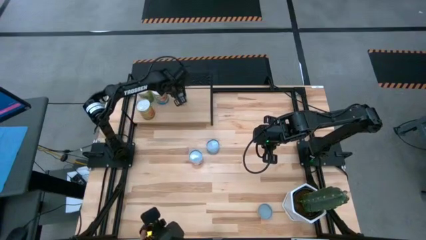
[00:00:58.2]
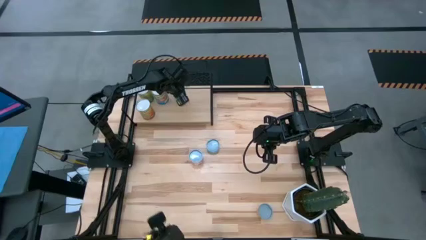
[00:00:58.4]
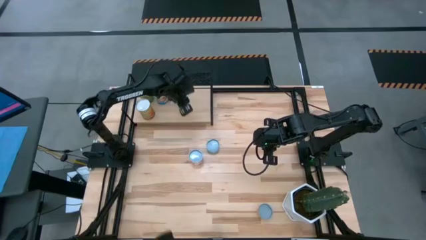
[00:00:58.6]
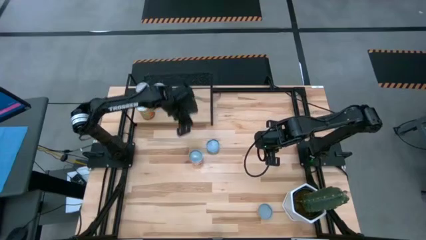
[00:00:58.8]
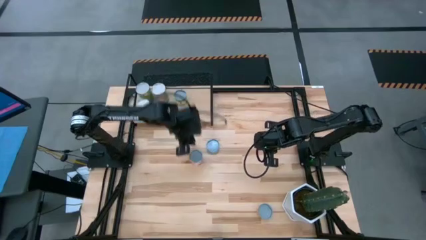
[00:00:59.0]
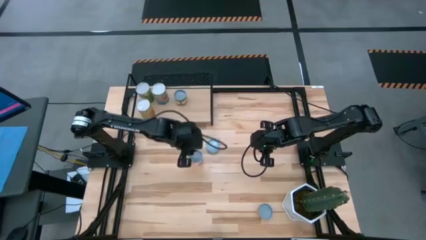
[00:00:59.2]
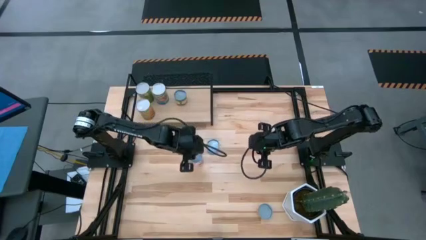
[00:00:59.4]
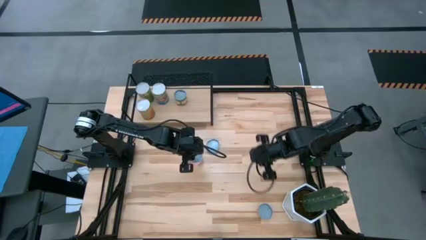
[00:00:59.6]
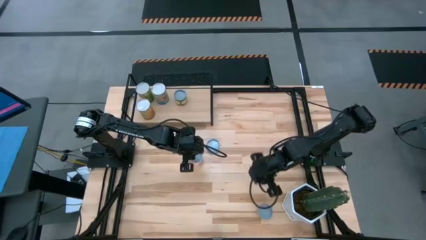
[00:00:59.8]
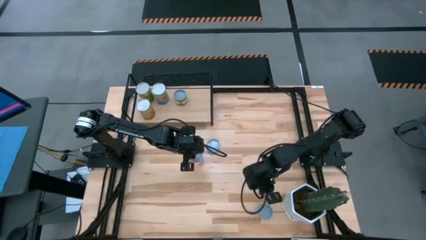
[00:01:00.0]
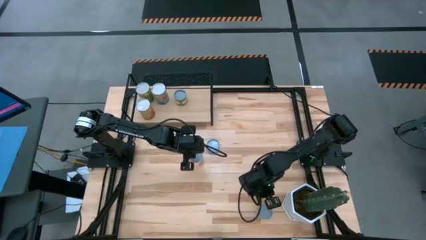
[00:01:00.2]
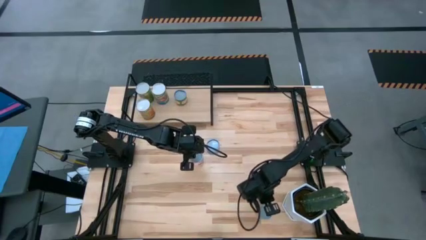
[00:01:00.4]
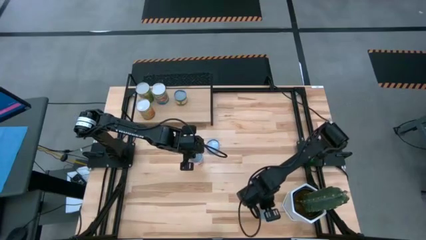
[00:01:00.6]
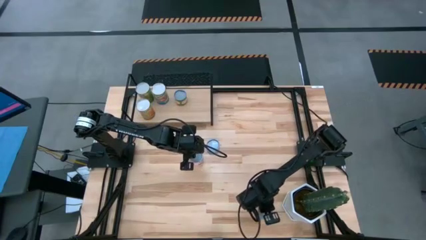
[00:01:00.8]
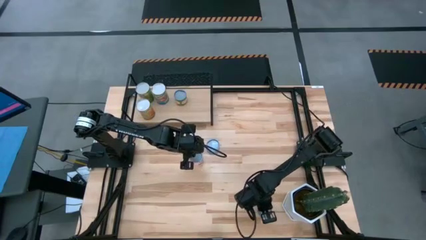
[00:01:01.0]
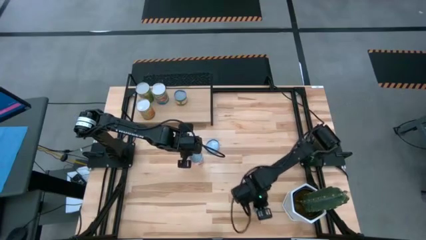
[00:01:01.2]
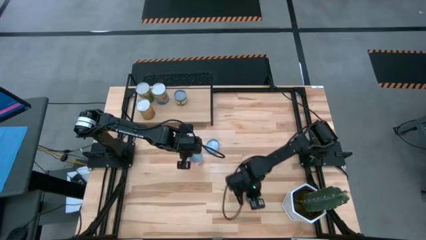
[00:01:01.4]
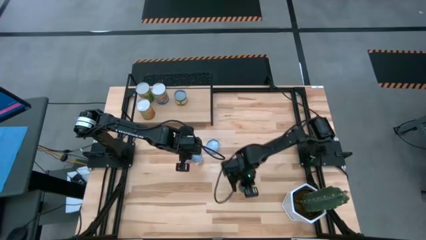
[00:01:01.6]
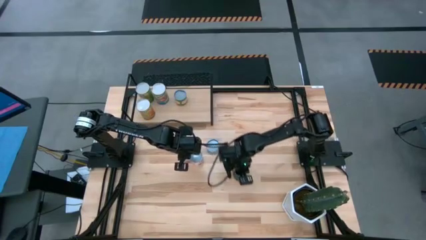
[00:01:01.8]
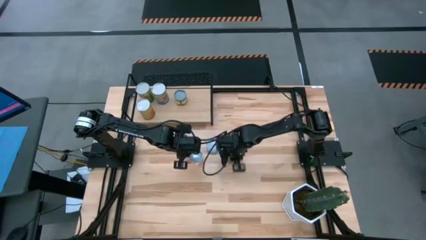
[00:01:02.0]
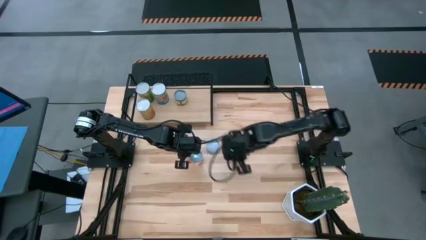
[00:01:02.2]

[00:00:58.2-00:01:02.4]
Task: Pick and place cans onto a shelf
Move the canned pineapple to the center of the table

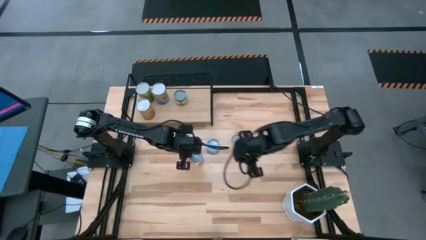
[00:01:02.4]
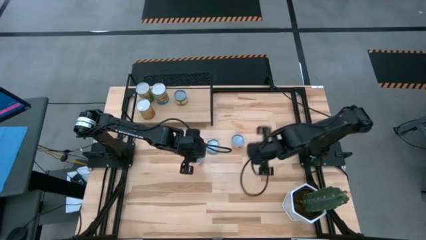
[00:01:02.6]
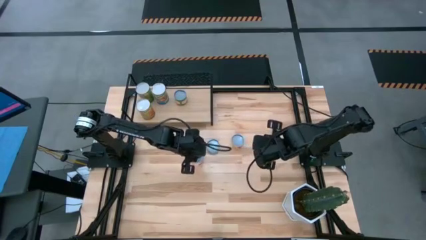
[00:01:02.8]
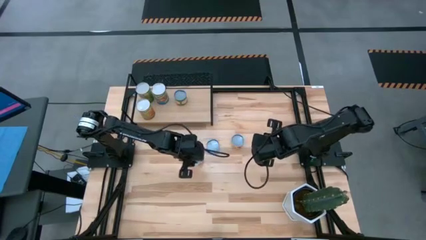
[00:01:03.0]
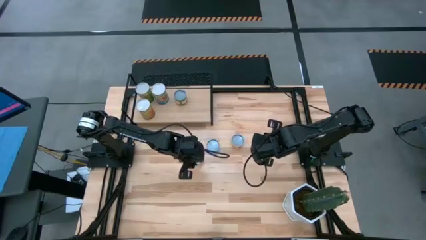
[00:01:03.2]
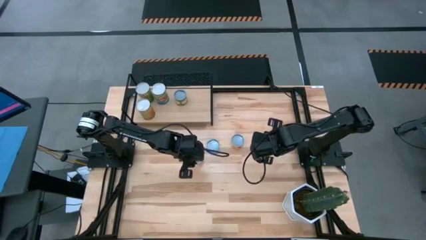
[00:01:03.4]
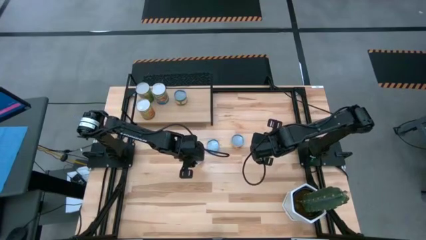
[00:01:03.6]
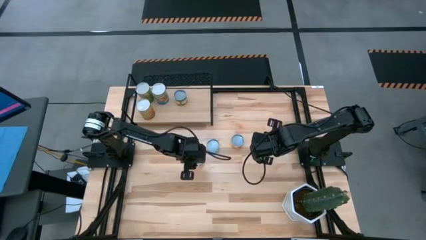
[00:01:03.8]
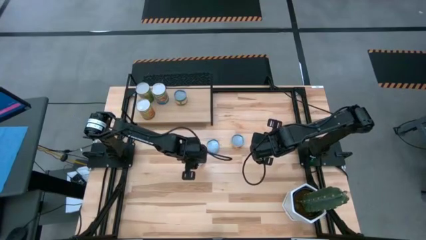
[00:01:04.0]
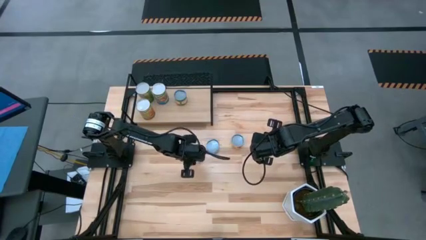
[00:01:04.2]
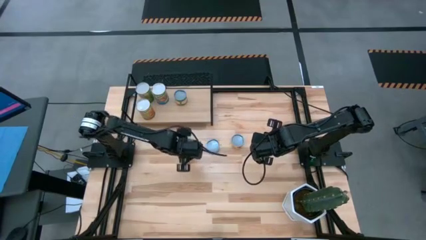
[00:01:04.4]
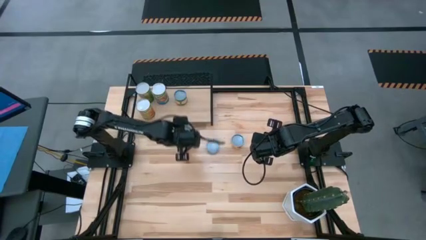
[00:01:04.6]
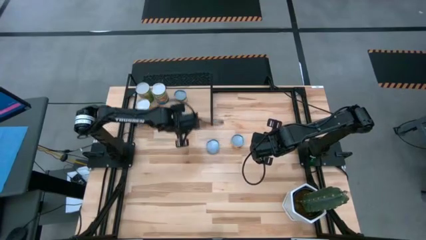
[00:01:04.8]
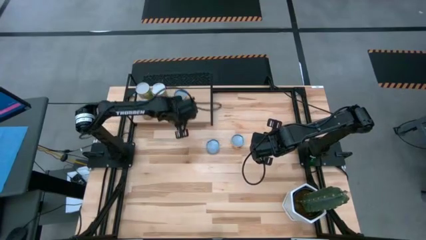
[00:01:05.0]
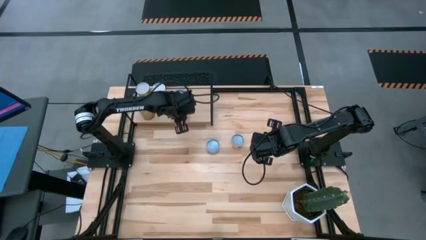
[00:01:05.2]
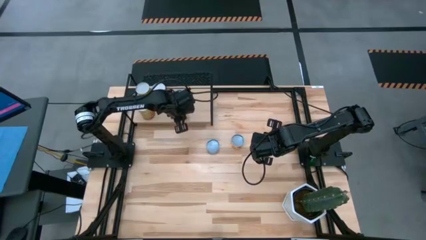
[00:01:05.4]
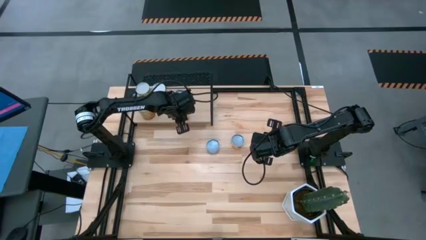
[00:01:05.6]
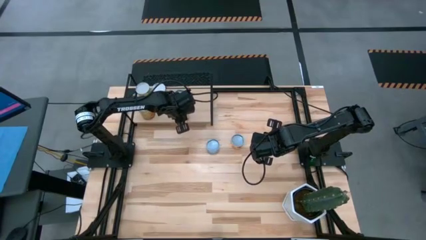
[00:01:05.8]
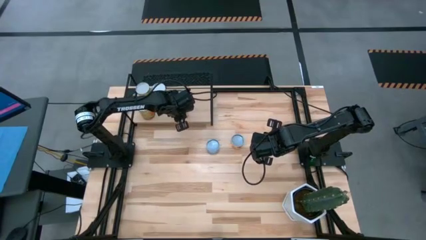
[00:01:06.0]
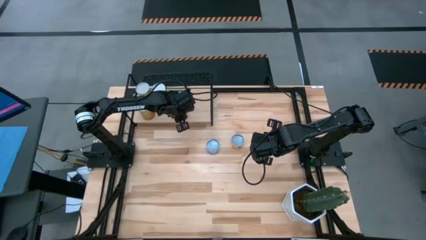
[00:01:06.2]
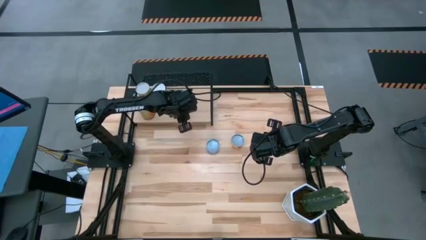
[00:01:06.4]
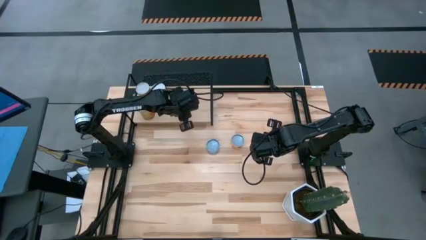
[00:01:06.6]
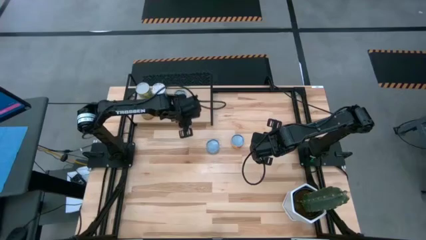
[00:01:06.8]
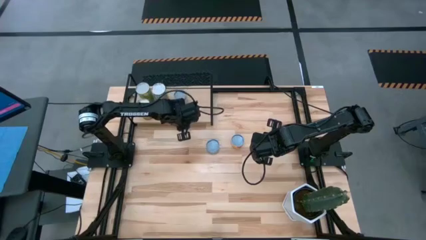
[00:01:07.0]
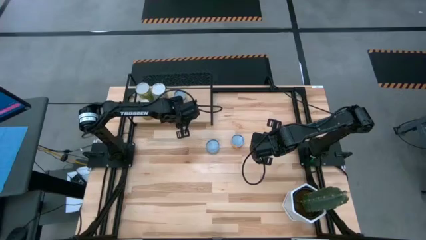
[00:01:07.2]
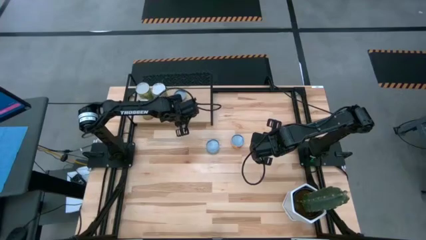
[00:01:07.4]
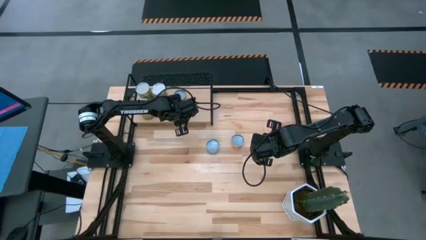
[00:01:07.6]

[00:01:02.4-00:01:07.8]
Put the canned saucy meatballs on the shelf

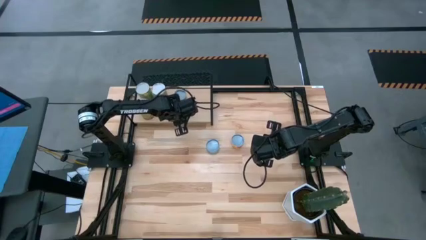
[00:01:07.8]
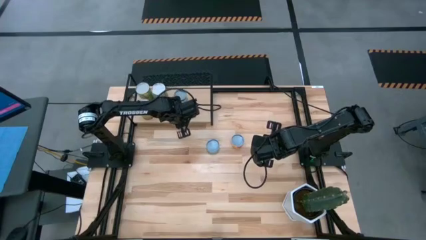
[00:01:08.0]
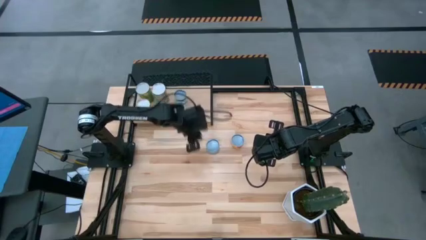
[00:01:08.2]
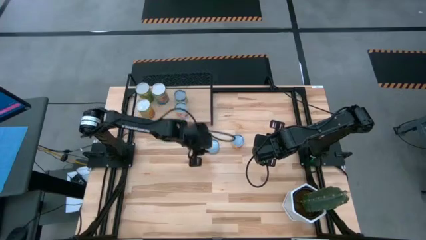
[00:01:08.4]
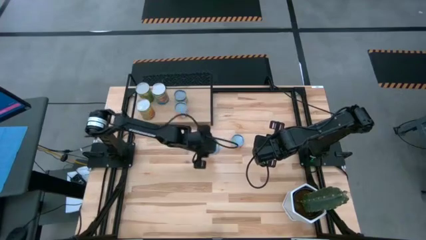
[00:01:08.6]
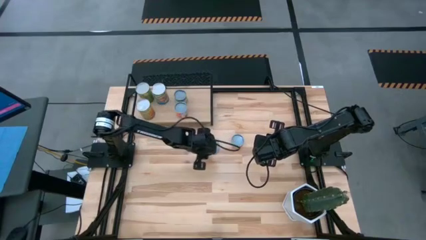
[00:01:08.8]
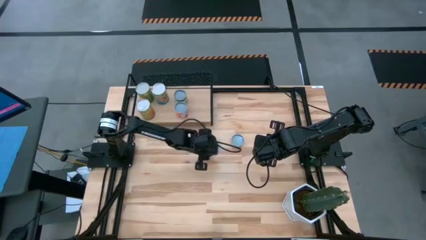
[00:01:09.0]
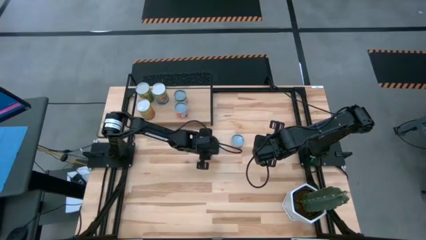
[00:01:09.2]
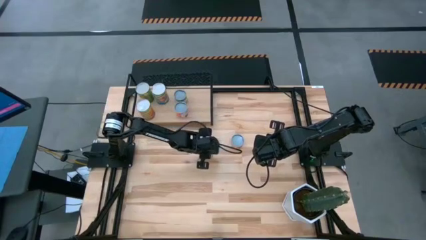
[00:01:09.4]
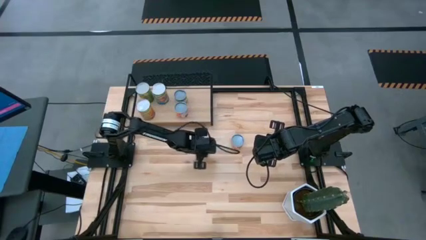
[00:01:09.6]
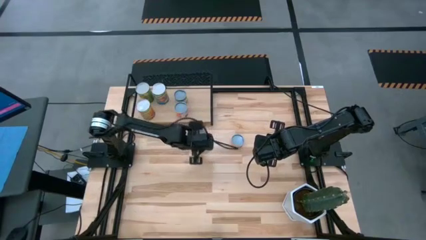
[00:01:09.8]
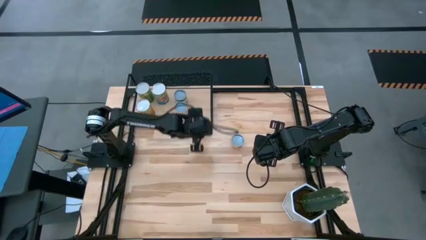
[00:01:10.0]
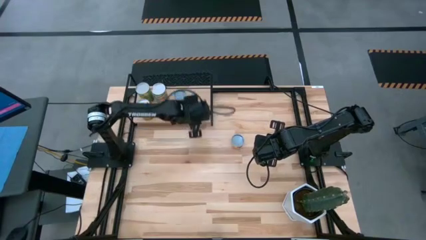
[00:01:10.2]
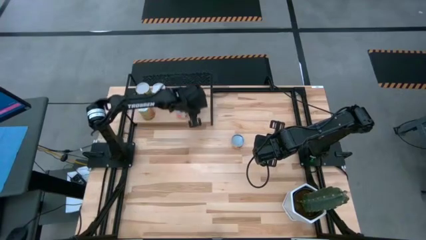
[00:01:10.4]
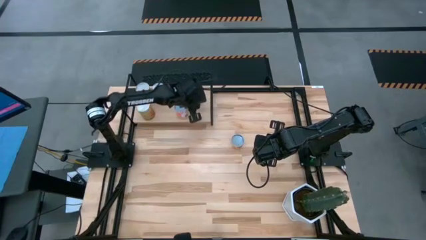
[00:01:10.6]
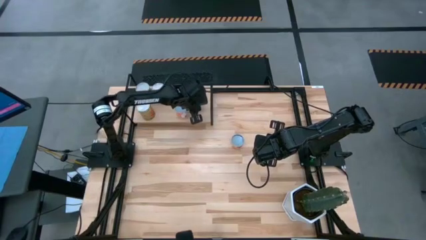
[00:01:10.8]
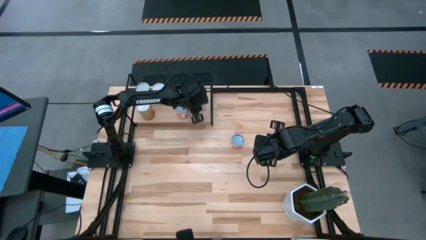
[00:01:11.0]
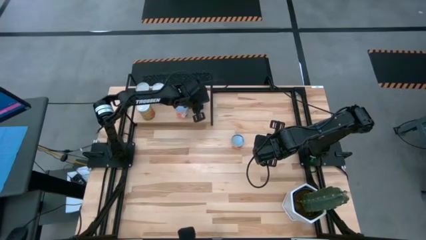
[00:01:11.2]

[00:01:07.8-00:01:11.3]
Put the canned tuna on the shelf
